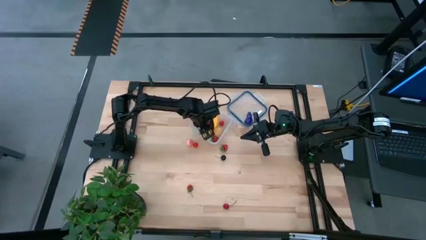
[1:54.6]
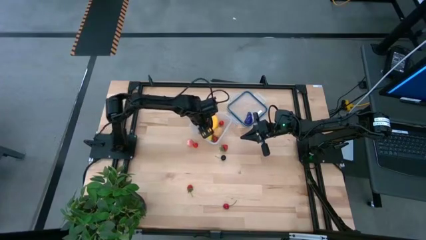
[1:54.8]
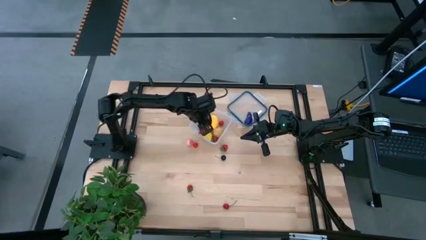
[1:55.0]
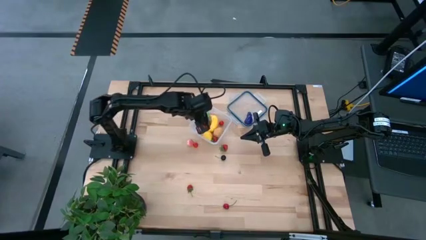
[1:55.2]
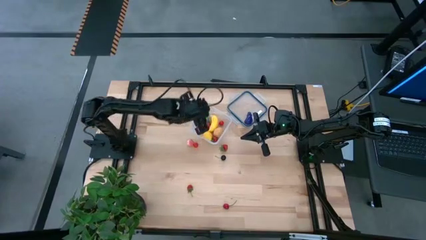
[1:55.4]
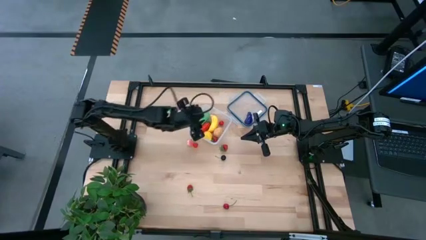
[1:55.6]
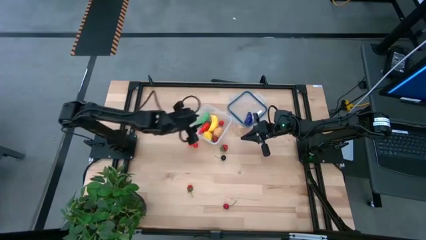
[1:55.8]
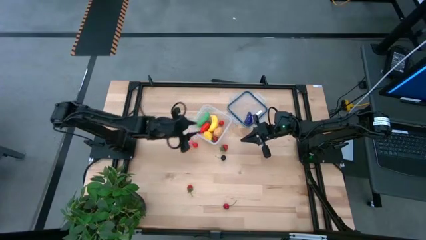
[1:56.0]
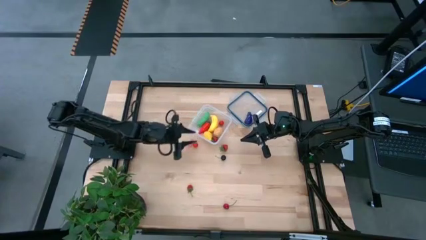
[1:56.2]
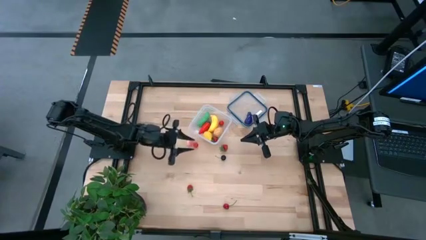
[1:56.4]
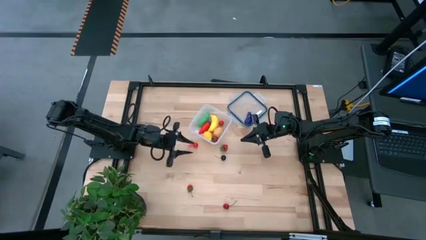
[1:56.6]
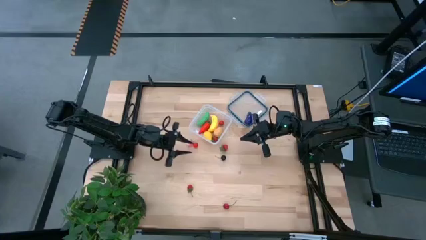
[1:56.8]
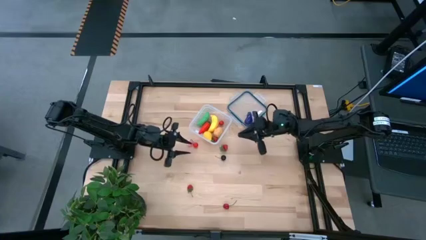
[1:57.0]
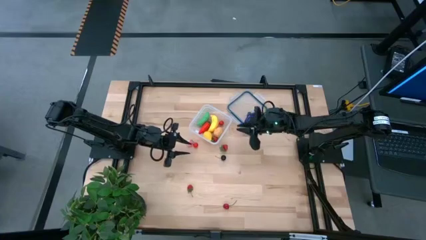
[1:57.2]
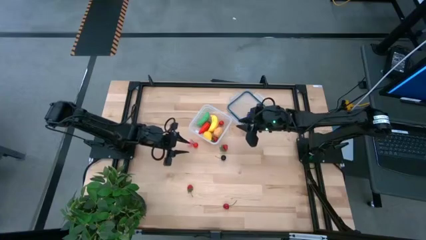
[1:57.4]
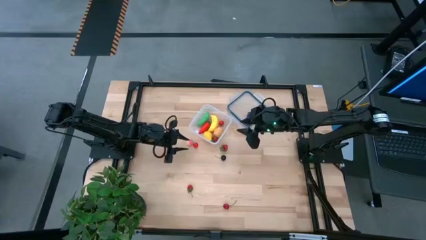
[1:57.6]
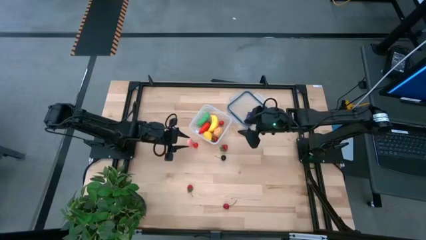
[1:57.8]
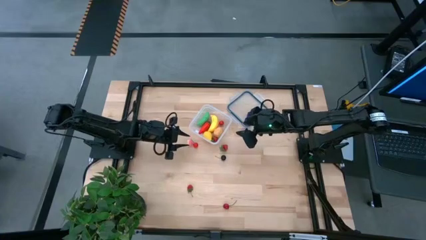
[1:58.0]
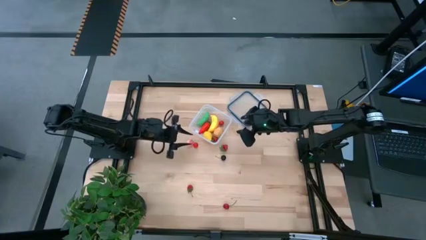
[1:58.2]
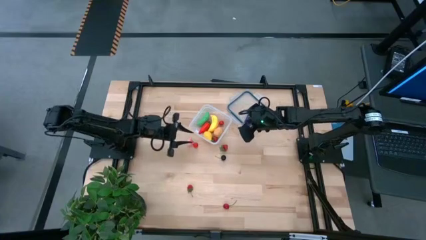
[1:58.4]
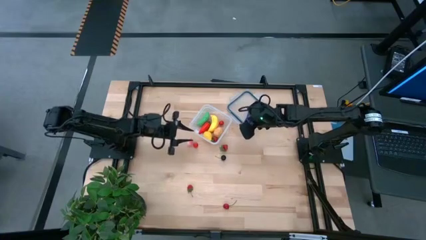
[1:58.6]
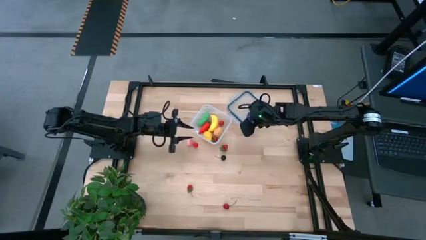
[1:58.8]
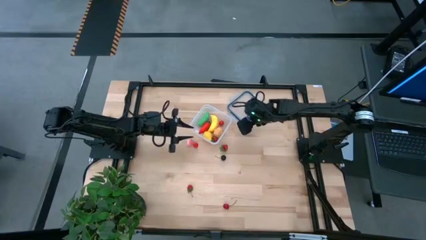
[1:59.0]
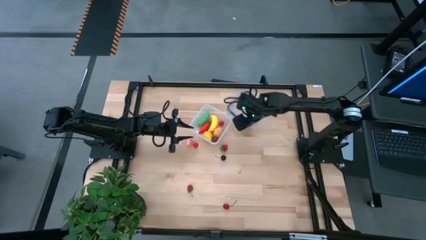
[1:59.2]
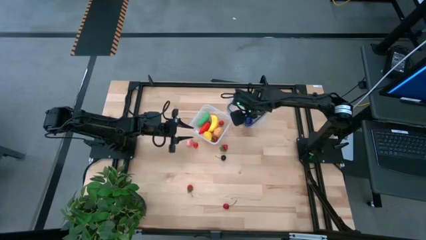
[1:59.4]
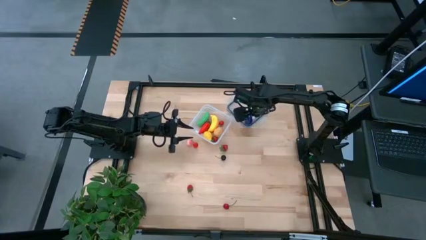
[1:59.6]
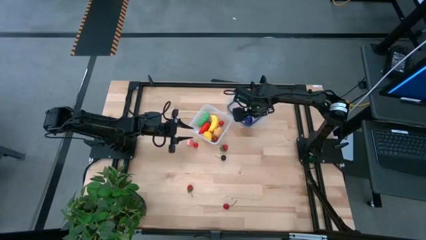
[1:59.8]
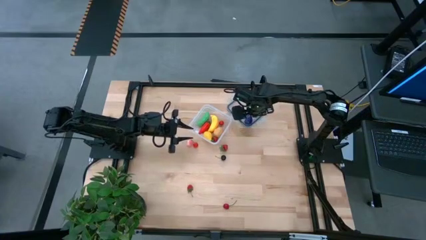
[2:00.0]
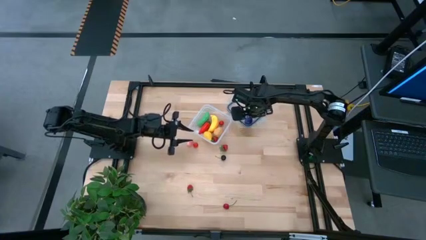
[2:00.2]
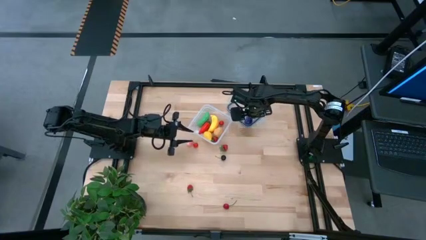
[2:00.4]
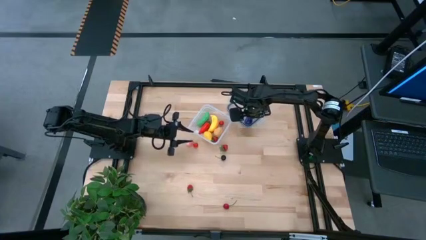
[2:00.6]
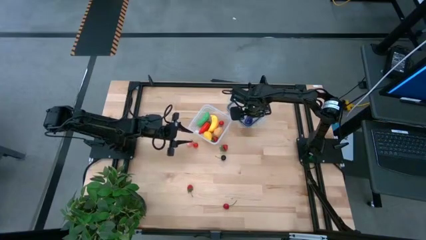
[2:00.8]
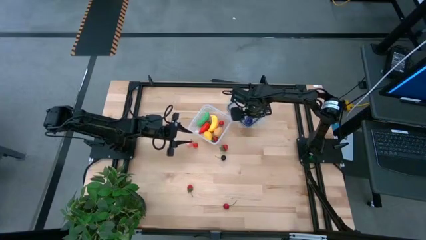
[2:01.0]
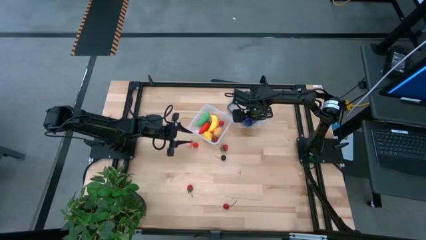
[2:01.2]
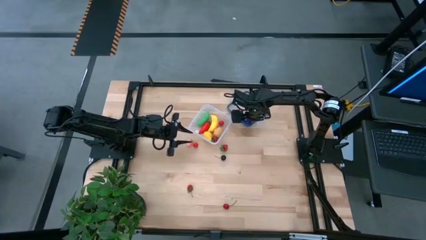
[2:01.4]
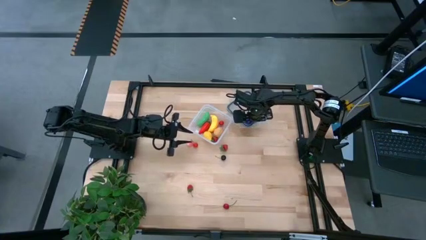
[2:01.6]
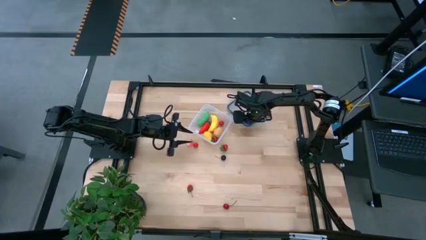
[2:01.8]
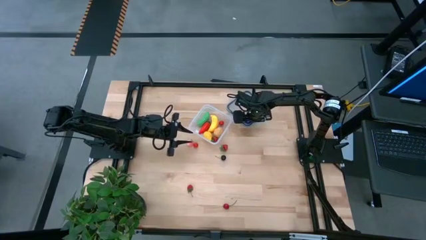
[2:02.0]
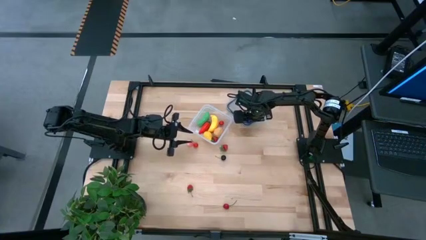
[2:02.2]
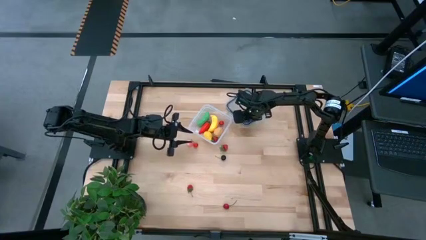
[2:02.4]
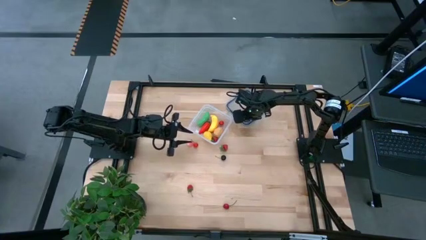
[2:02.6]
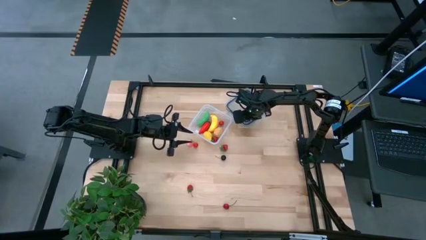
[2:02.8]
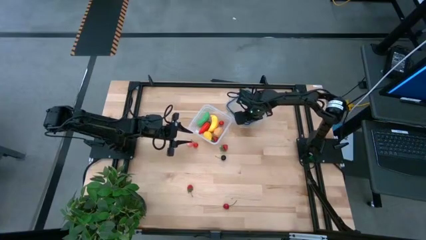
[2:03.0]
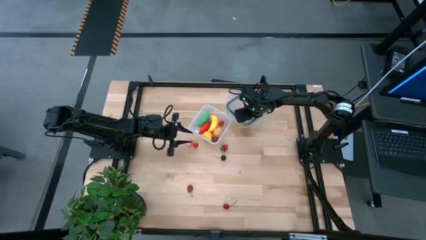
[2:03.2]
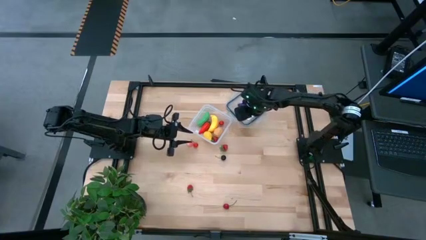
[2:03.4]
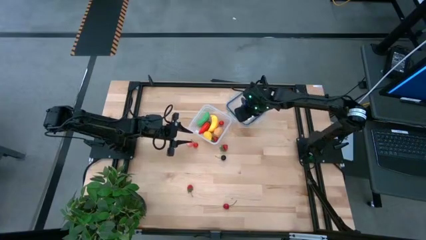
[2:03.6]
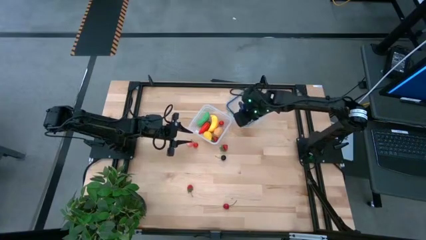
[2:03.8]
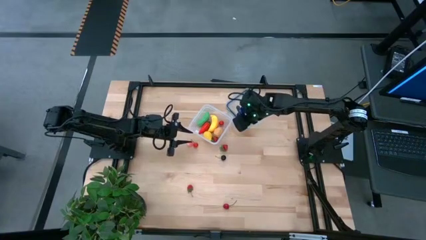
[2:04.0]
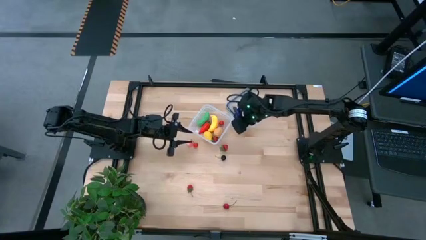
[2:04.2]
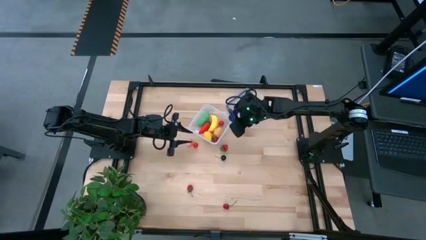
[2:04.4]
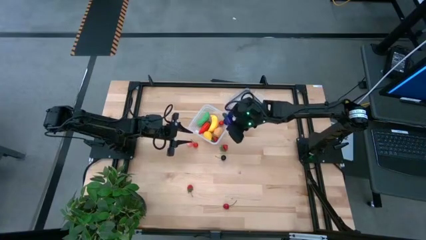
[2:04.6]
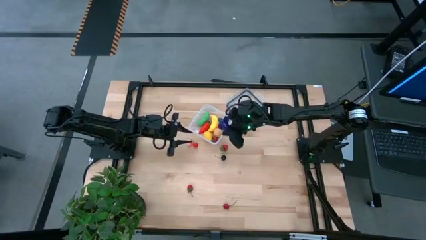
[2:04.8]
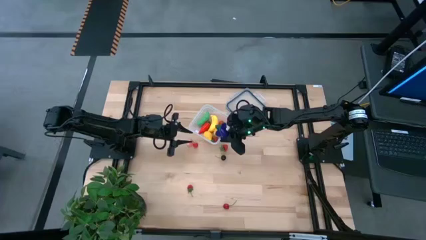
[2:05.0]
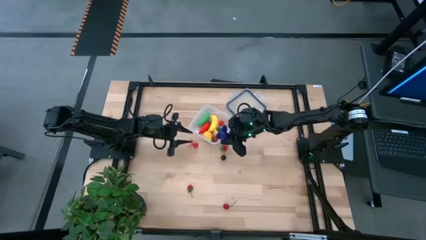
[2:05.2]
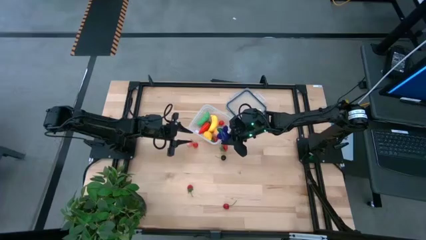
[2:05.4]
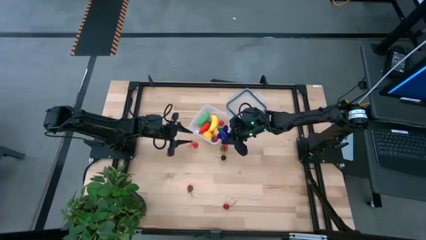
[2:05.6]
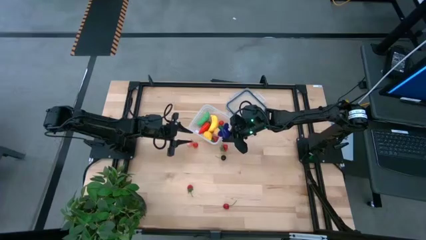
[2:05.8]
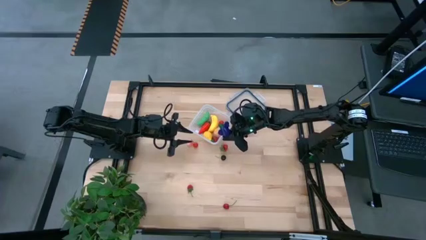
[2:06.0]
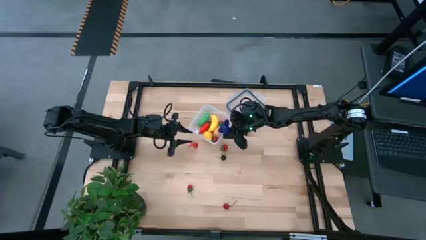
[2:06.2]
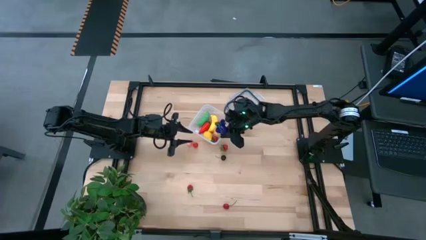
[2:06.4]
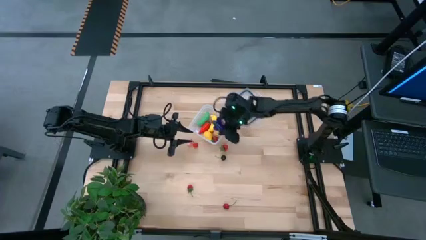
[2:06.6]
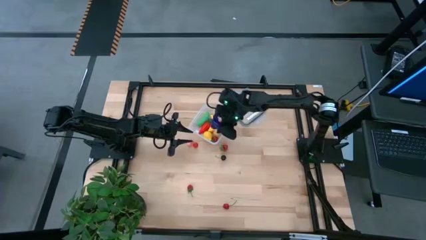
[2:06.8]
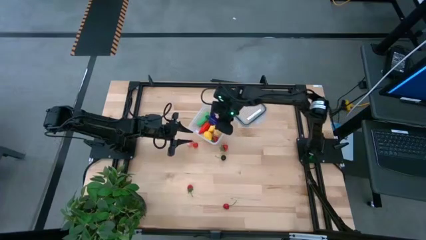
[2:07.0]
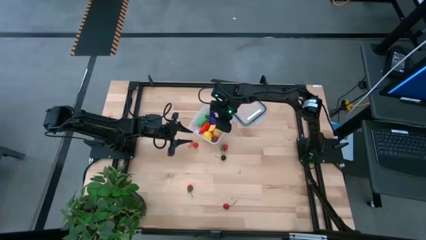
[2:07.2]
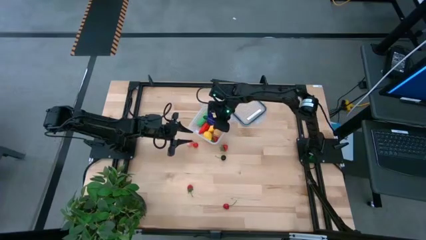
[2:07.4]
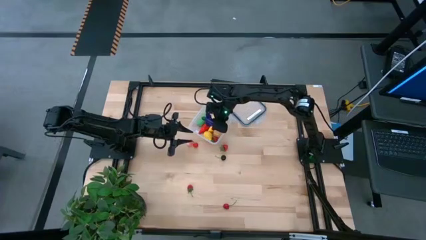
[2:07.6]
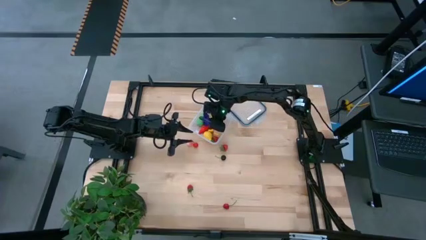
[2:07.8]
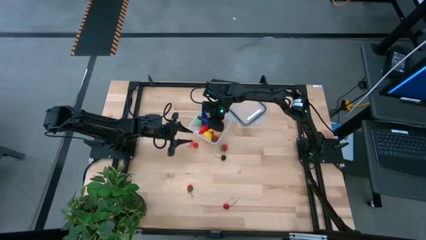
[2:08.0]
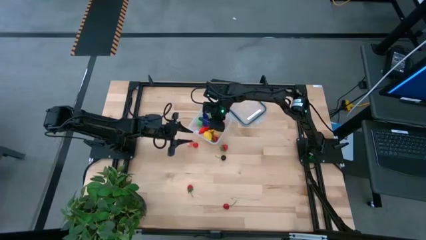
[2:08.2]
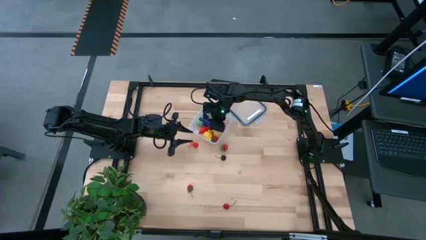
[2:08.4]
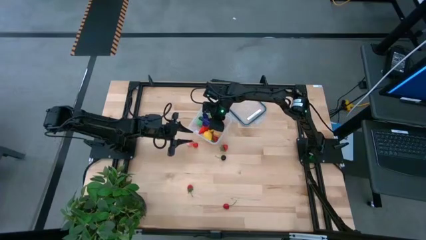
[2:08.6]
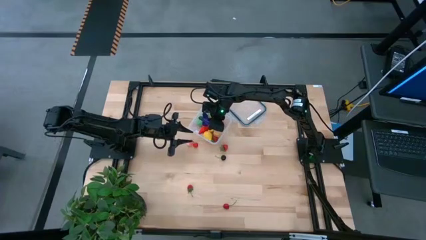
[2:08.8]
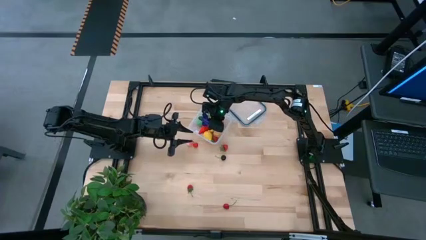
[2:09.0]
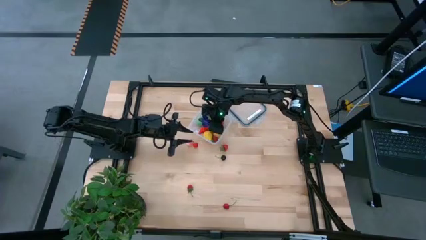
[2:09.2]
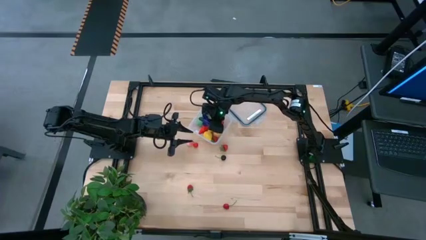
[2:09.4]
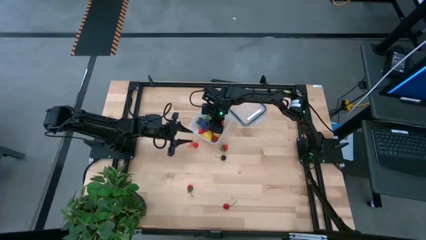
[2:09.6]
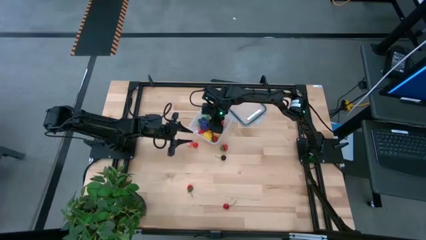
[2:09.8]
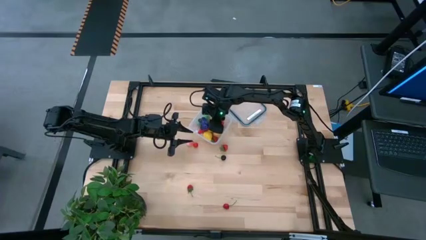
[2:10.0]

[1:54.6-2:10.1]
Task: Pick and placing Produce into tupperware
Put the purple eggplant into the transparent container

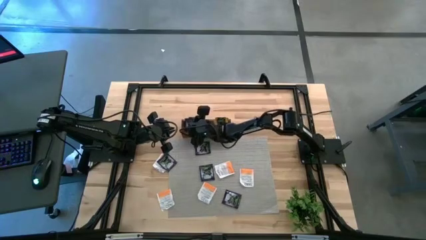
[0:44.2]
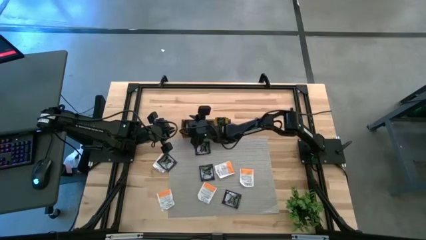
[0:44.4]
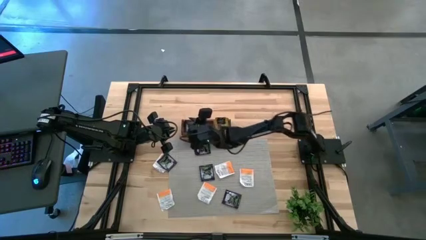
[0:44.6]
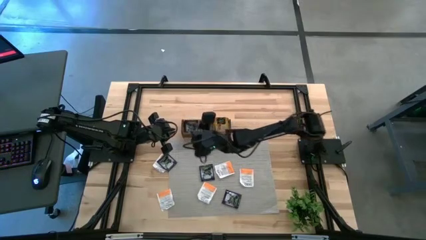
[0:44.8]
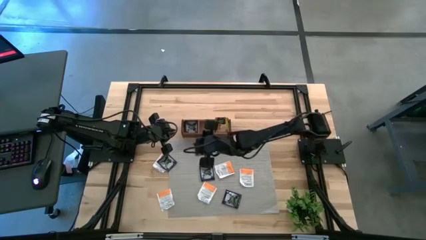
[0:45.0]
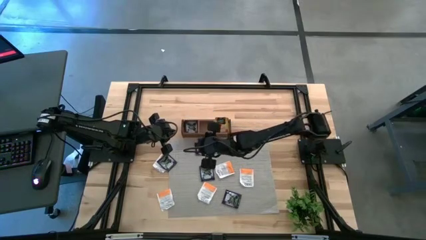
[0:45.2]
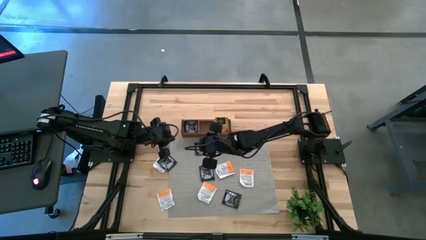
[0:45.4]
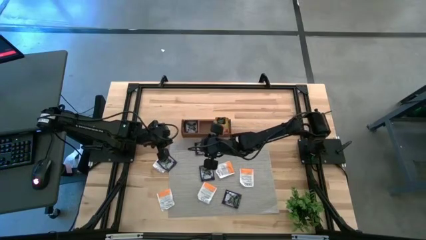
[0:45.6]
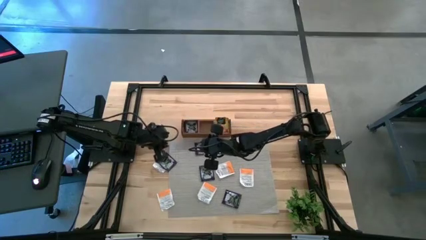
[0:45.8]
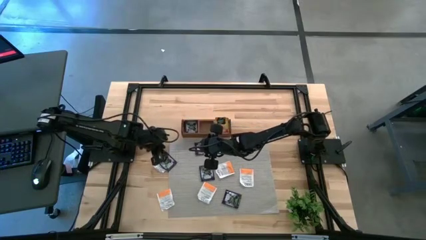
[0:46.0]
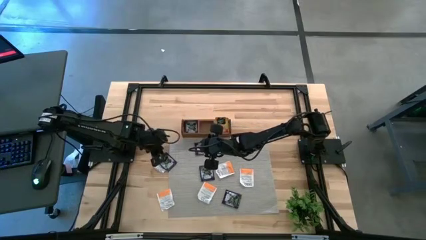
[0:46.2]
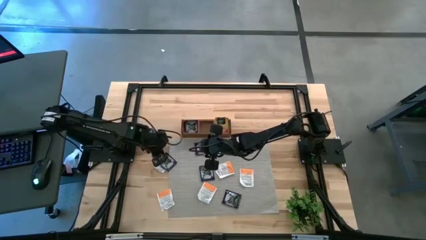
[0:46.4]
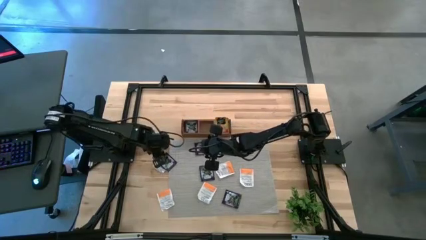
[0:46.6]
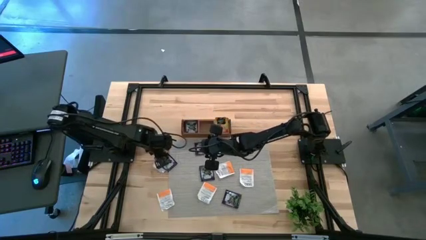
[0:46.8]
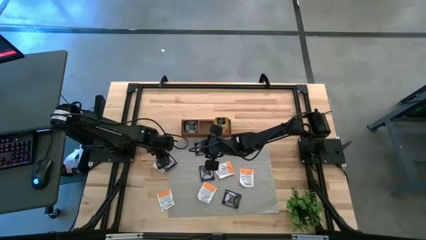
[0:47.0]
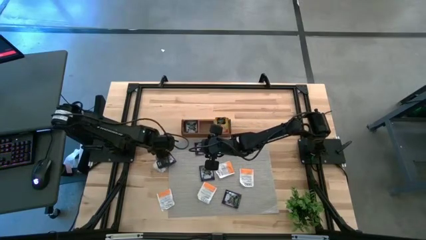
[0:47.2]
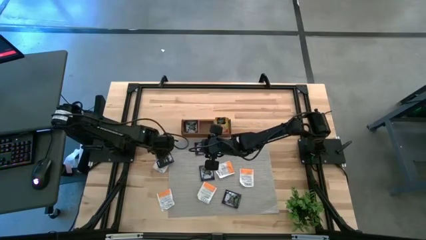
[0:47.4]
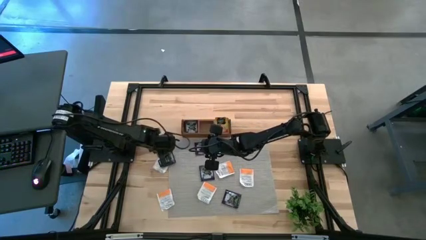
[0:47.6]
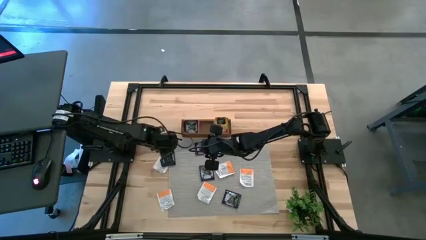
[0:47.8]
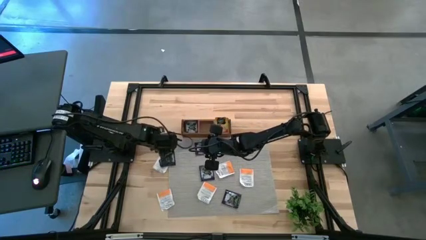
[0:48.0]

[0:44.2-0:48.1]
Task: Pick & Place Tea
Put the violet tea bag into the left section of the wooden organizer
